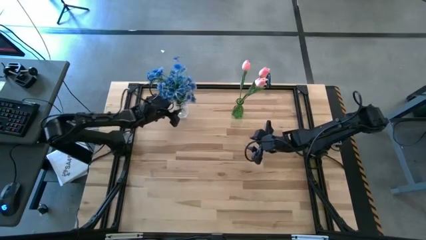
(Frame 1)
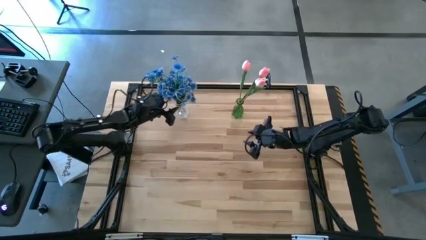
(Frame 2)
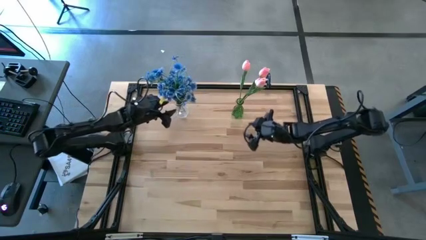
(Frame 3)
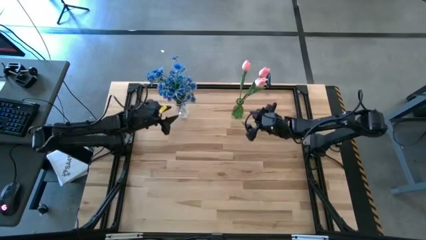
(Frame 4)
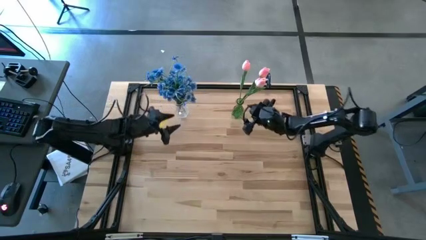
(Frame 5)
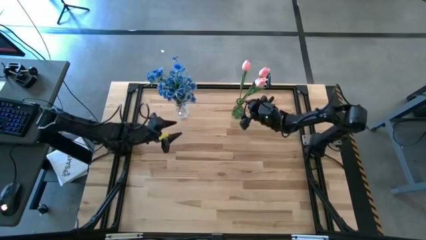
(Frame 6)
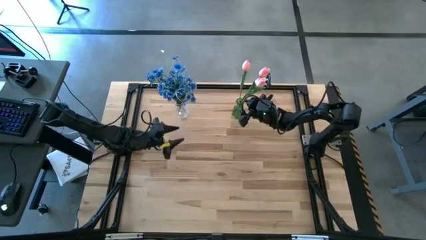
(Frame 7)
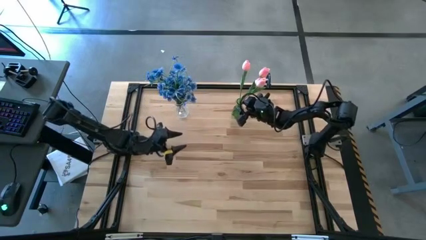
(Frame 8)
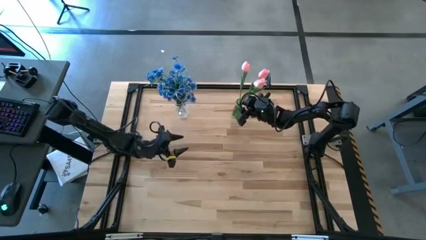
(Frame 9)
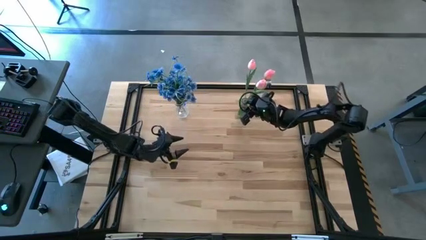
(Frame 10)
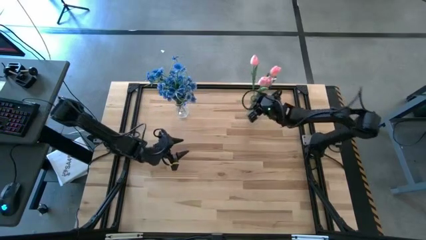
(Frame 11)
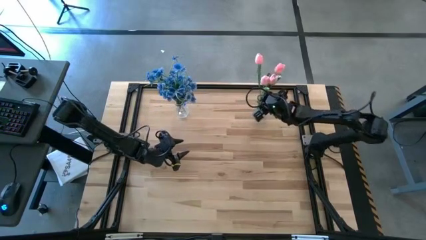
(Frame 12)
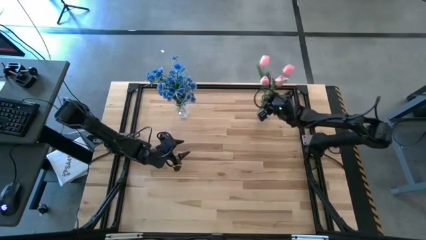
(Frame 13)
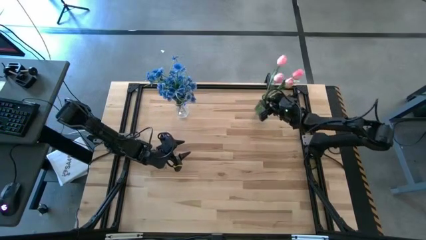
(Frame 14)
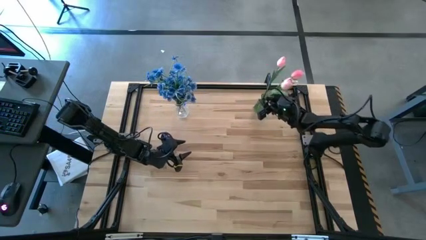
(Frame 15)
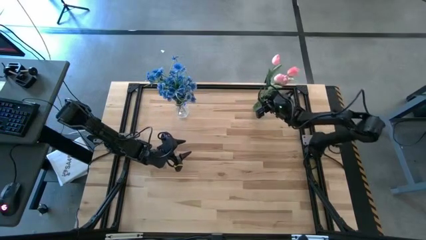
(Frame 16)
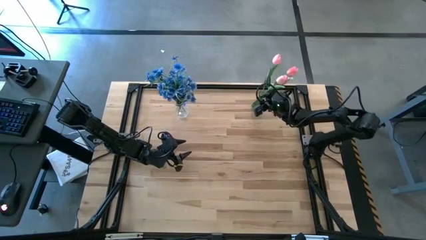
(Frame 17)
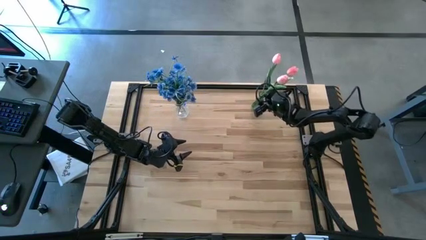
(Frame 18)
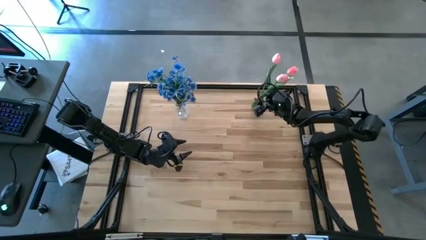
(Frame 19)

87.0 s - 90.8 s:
Task: Sort flowers into vase by color
Adjust the green vase

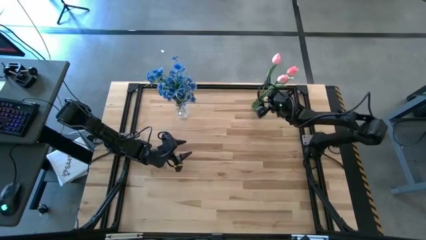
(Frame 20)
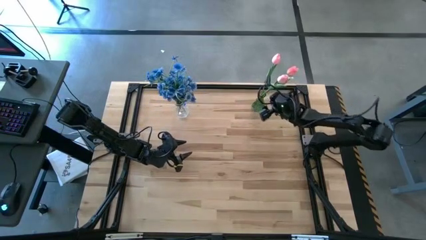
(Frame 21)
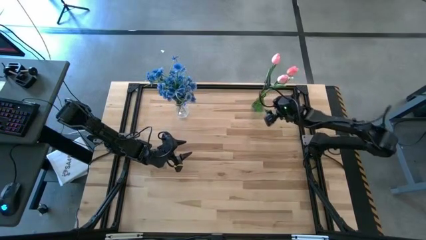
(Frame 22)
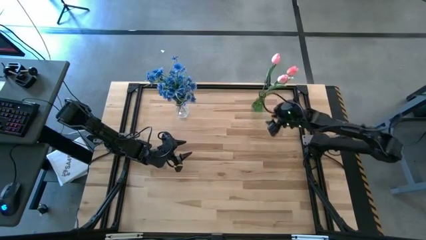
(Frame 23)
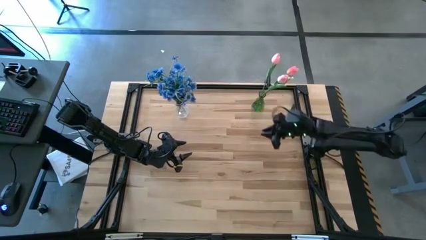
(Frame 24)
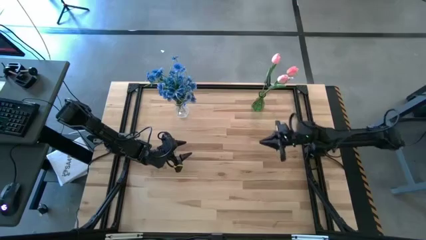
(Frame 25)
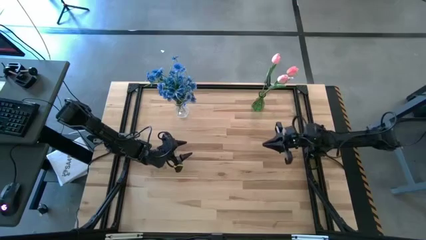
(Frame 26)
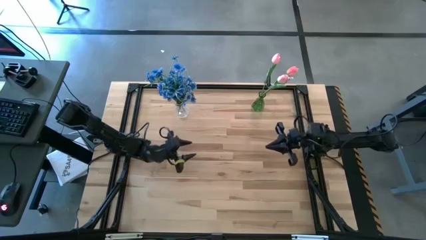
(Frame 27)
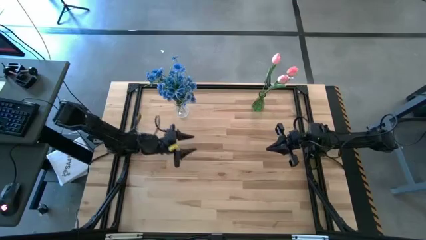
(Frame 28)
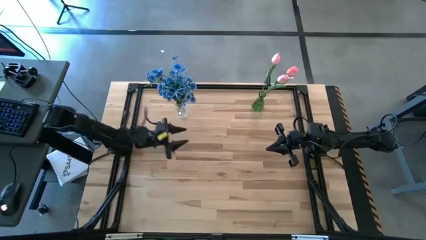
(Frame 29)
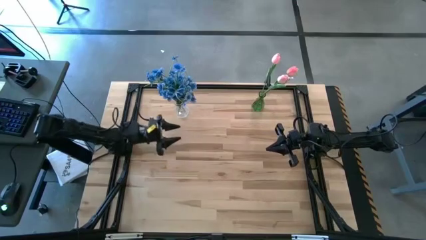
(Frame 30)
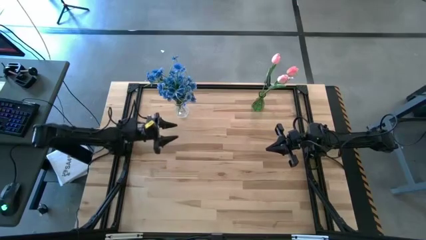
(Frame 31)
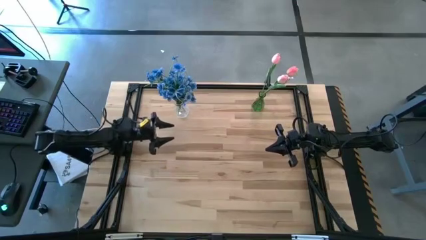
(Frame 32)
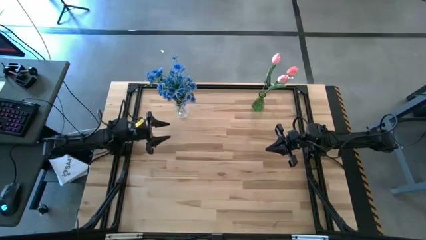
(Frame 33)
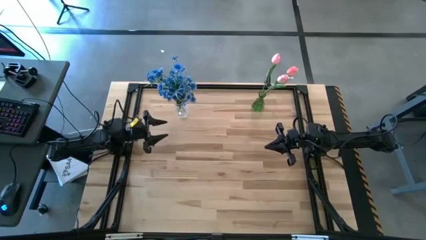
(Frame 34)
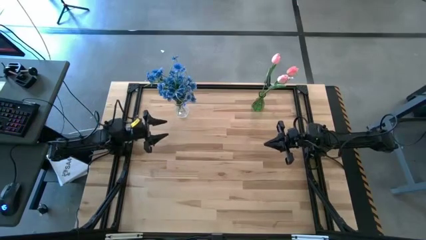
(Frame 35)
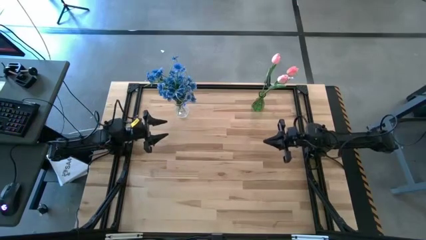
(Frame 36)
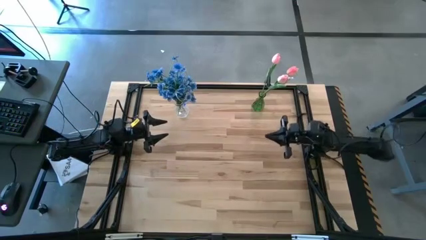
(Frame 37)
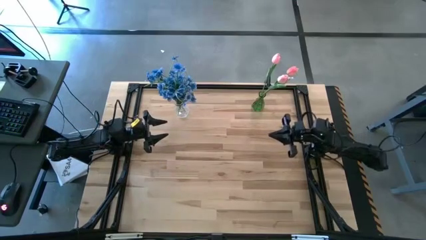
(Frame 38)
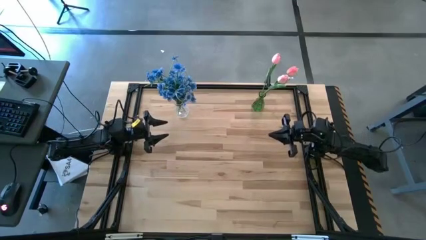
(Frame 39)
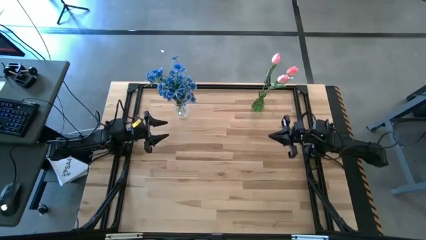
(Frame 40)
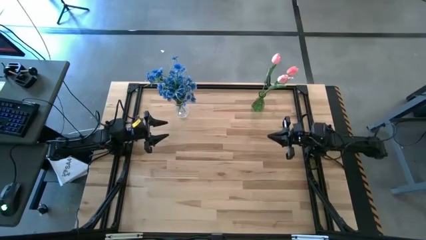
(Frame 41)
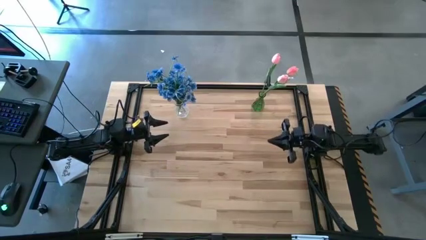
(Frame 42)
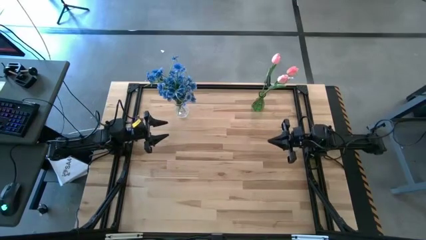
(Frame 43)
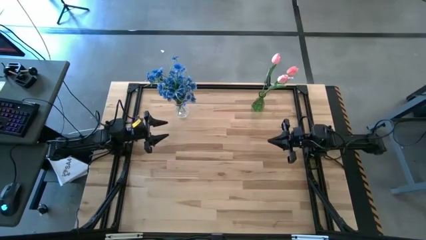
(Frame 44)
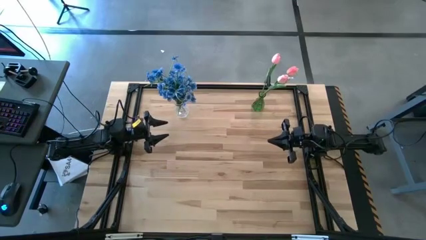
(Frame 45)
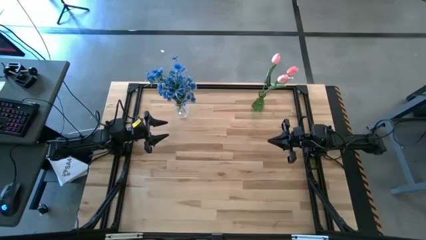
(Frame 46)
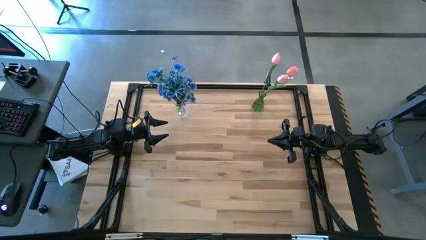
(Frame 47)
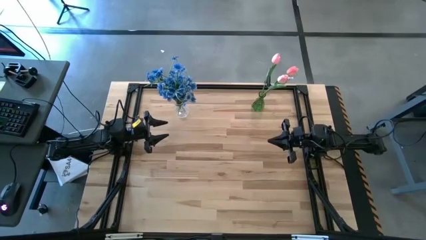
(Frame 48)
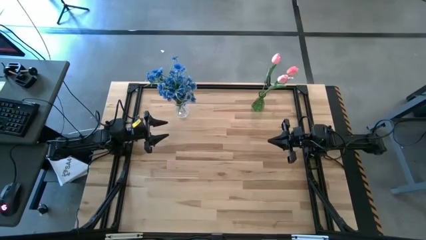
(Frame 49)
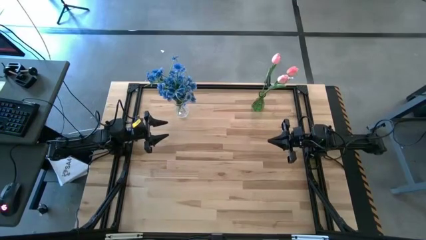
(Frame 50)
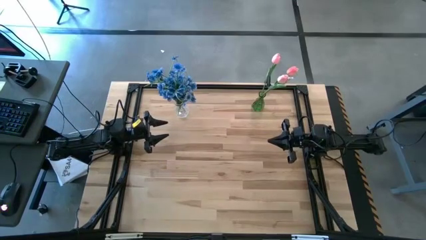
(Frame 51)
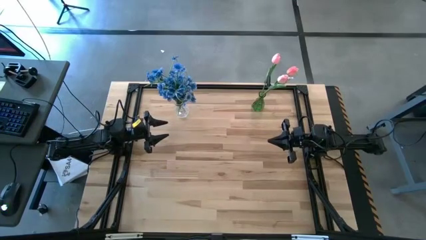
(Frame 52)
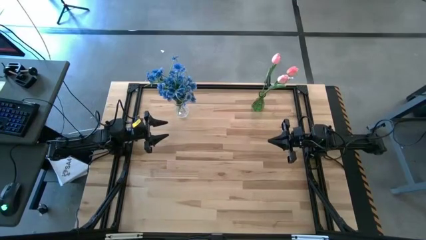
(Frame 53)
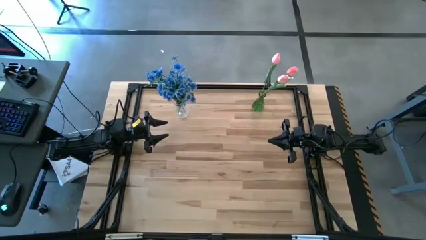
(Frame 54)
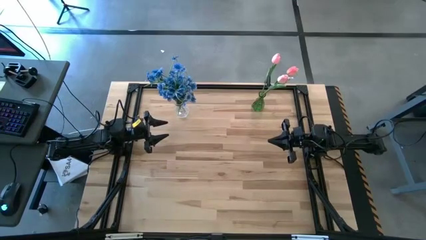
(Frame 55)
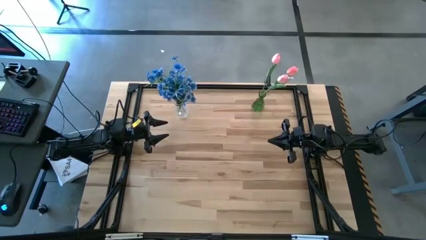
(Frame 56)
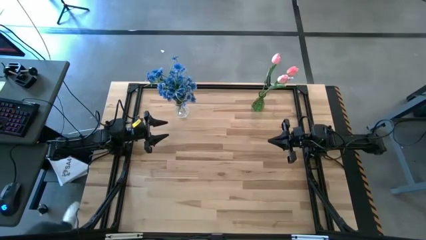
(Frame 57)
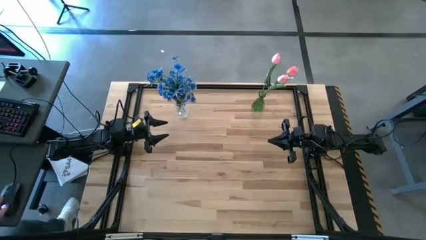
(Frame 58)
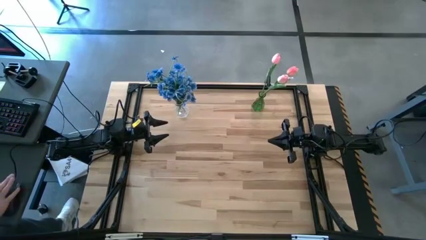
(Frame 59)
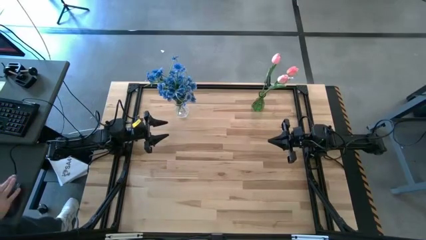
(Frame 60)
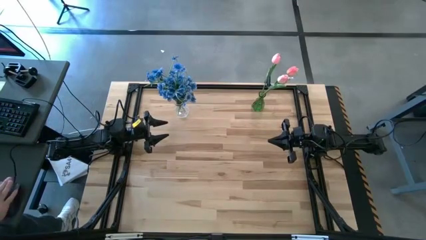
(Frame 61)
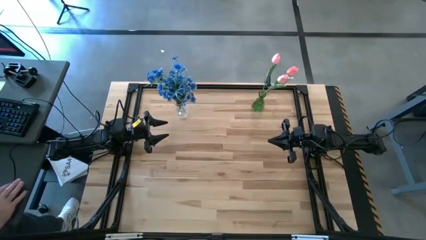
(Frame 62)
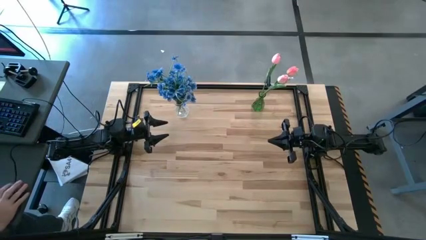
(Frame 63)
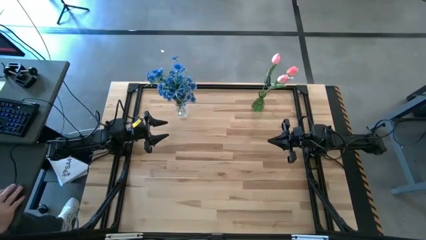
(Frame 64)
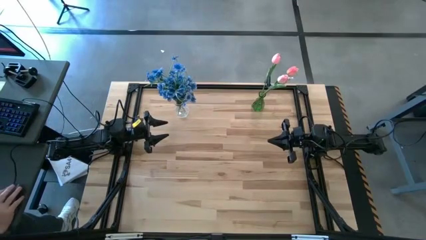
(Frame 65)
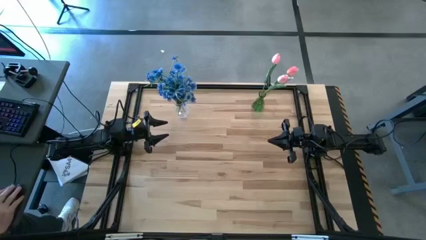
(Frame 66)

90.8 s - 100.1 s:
Return to Home Position
